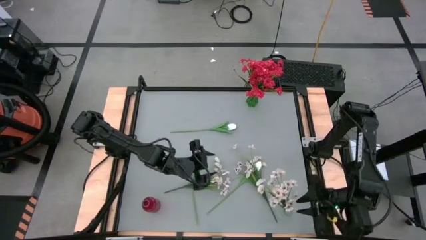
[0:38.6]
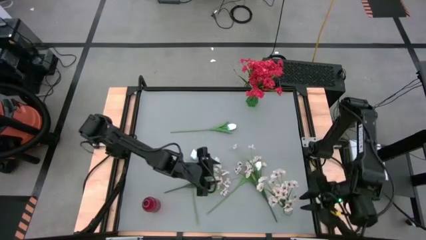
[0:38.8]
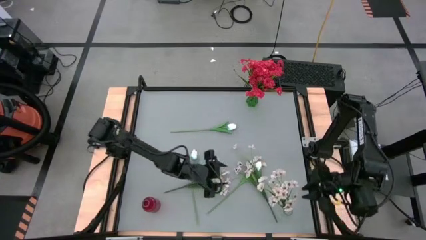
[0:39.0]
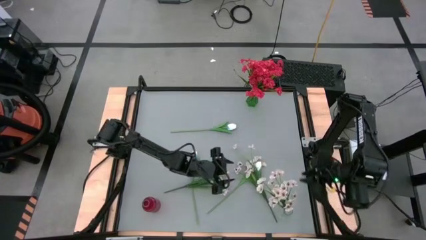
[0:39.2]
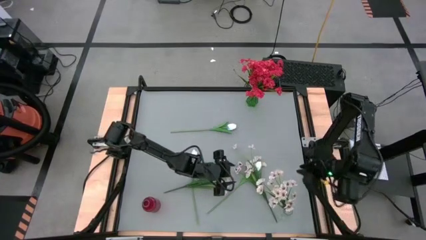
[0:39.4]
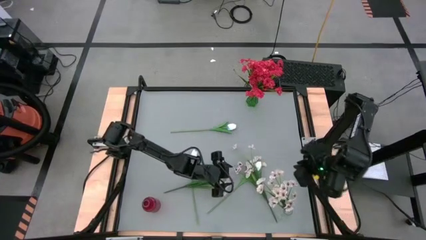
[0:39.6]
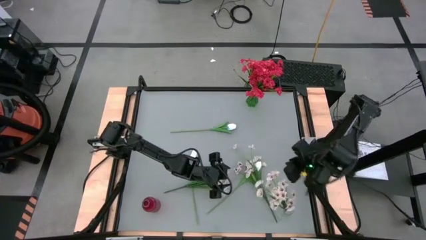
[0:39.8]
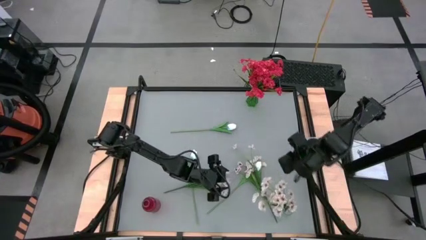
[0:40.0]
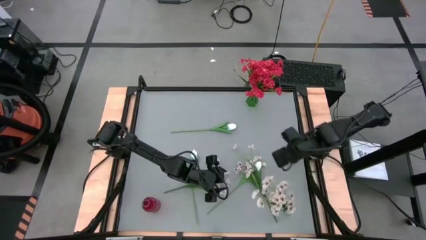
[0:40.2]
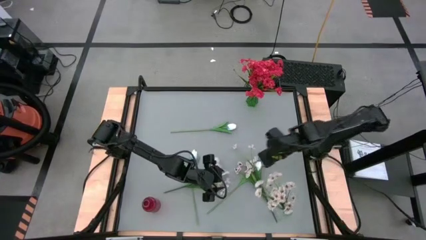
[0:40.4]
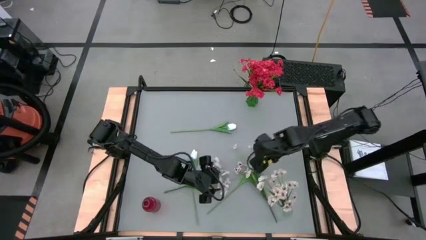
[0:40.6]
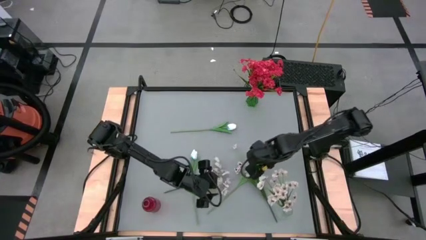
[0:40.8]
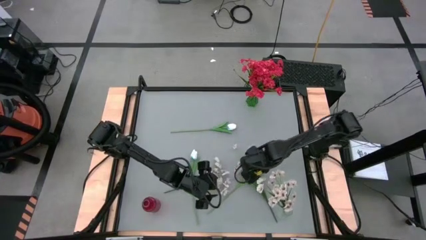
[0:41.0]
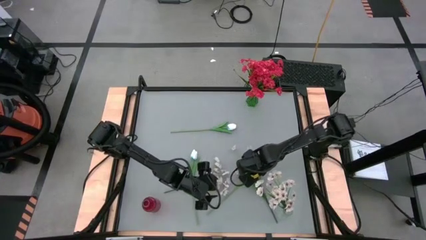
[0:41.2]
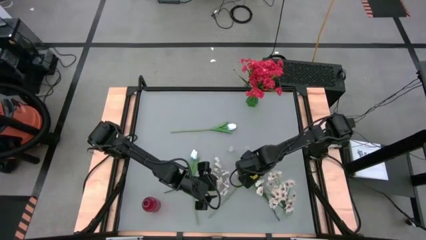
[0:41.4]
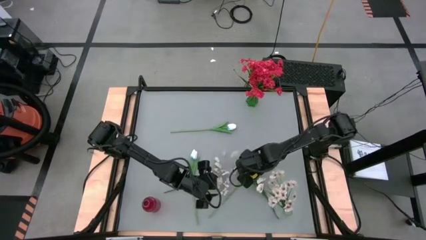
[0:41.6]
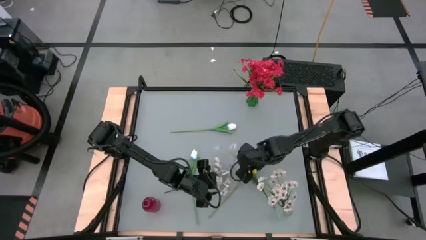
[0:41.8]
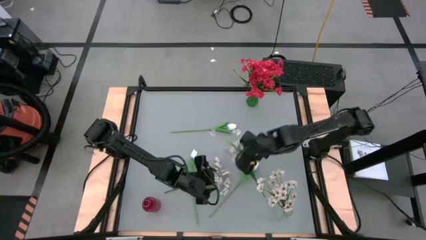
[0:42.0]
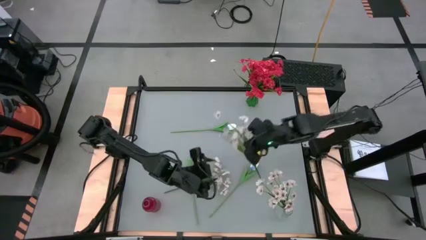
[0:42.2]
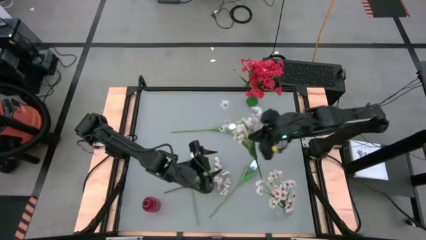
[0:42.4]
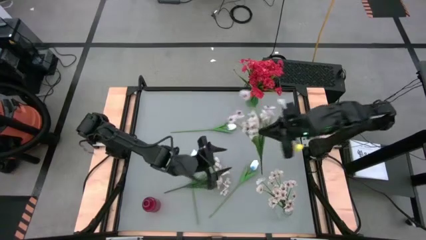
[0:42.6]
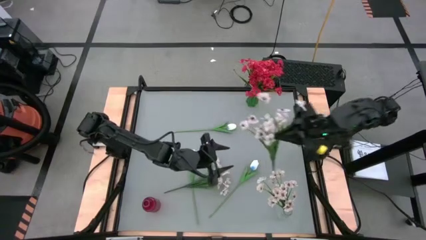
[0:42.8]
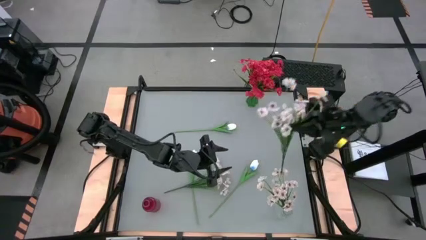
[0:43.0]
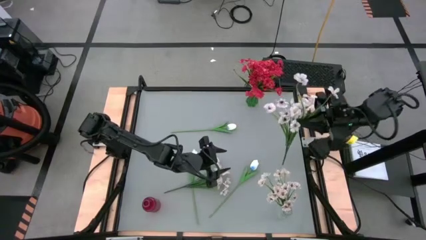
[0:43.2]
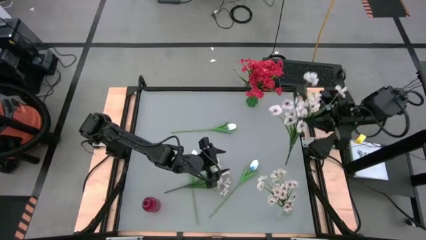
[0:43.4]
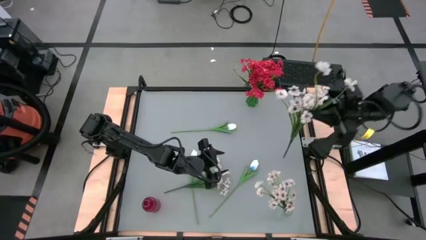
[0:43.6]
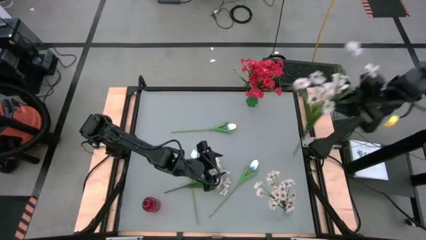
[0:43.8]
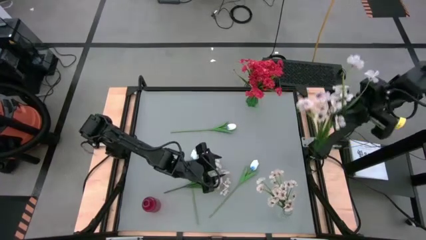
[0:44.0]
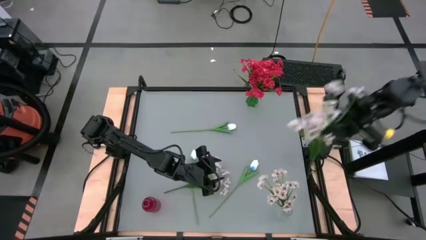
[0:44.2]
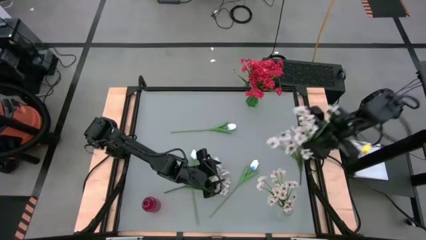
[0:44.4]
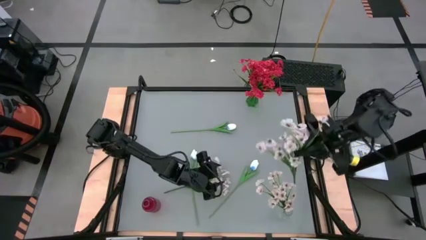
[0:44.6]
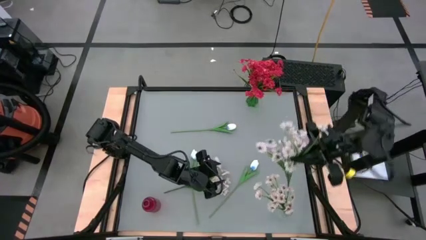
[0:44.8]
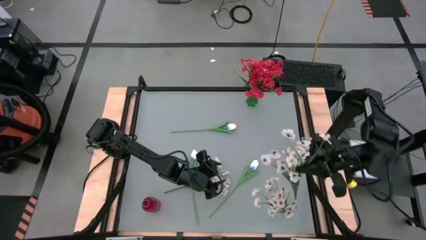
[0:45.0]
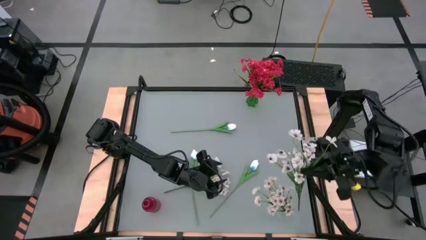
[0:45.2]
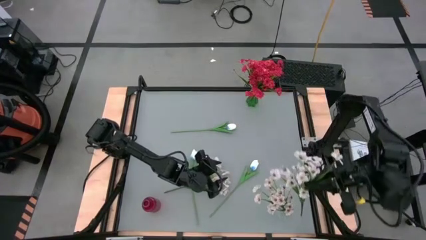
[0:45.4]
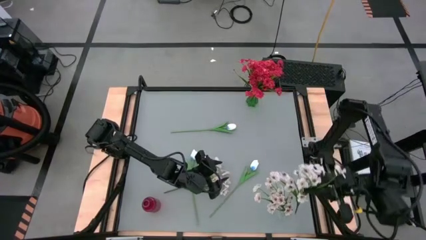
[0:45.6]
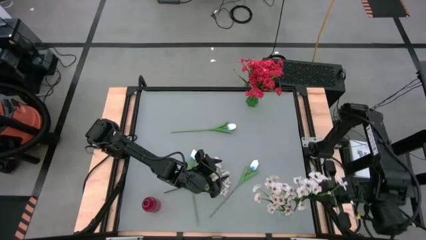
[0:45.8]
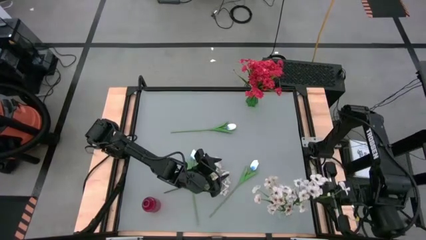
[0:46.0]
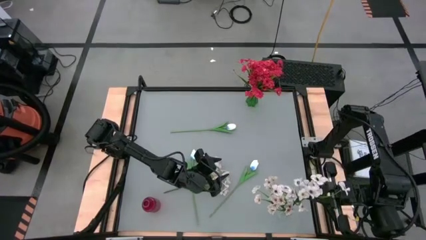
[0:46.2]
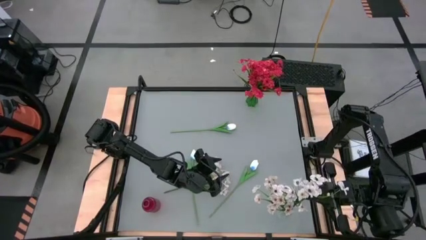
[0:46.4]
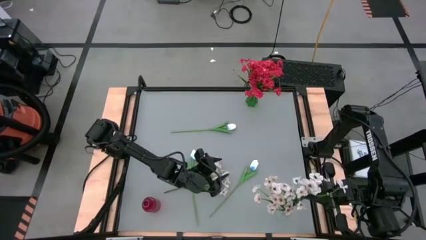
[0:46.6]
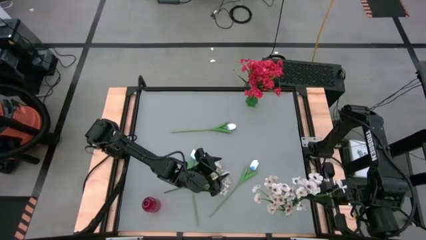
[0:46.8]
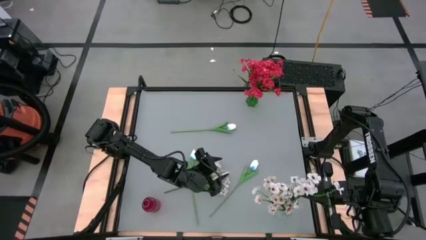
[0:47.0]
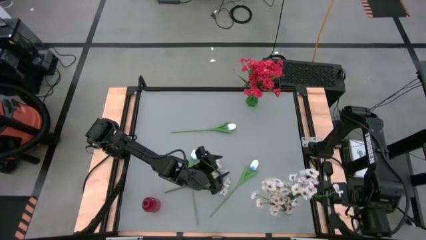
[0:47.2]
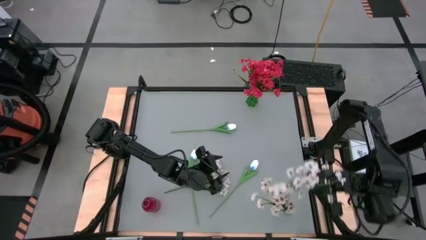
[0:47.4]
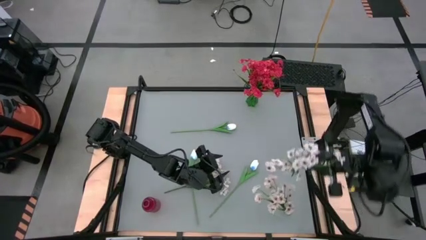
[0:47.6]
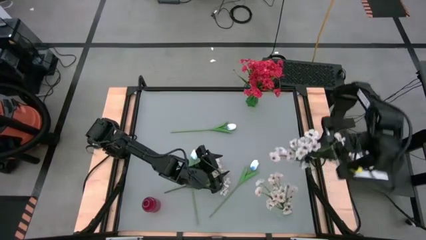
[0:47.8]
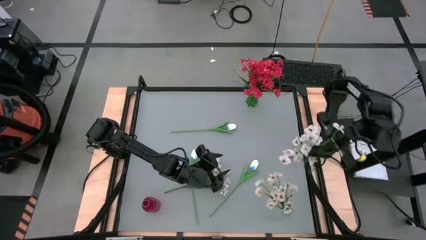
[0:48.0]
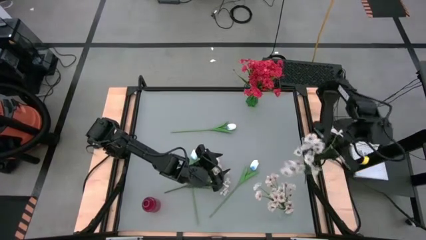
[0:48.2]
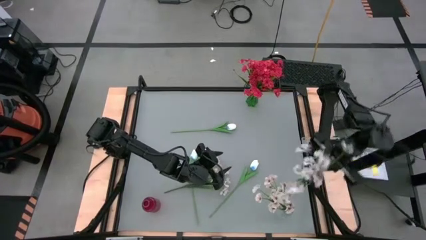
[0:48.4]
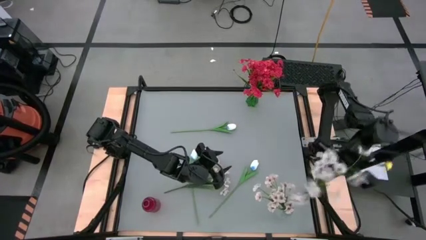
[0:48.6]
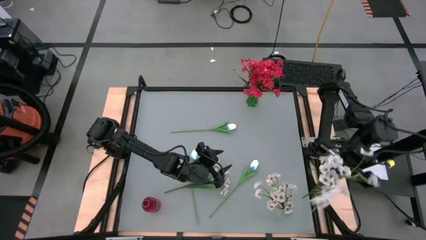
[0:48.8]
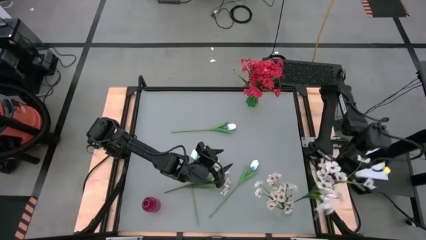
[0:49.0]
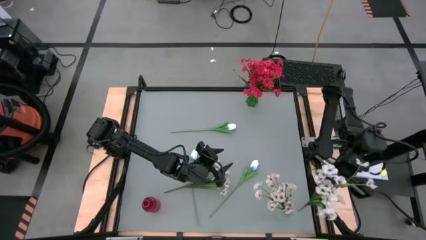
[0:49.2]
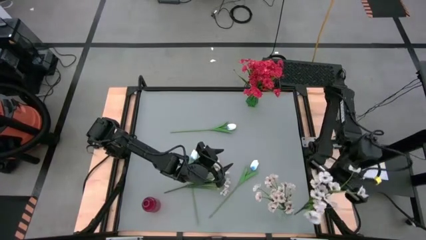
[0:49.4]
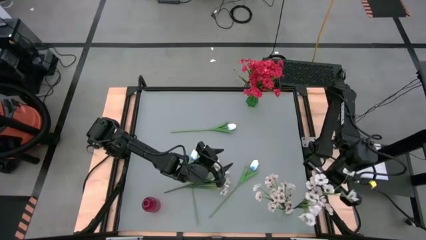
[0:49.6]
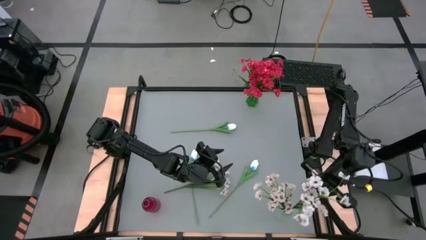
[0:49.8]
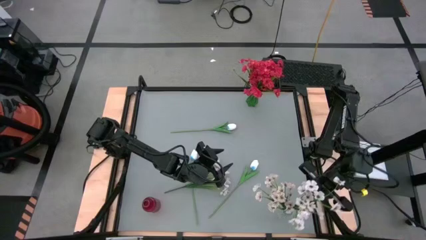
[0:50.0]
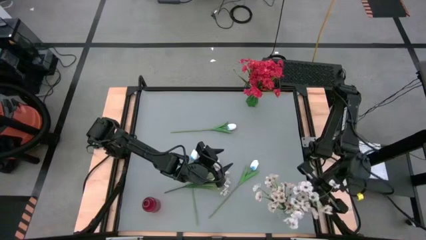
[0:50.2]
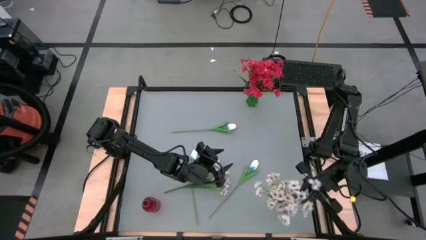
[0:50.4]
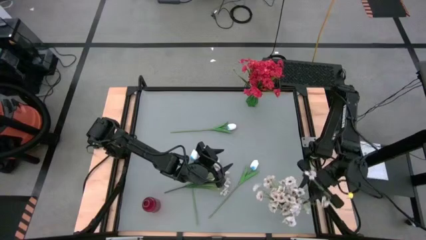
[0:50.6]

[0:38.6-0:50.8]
Task: Sort flowers into vase by color
Put the right white flowers into the transparent vase

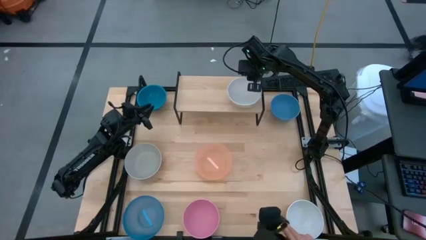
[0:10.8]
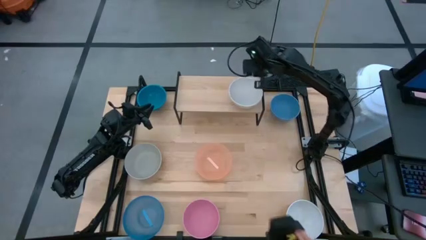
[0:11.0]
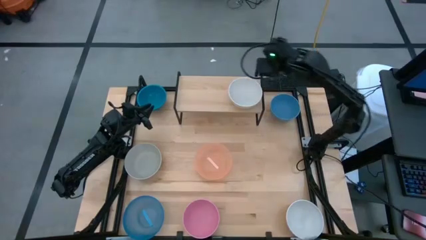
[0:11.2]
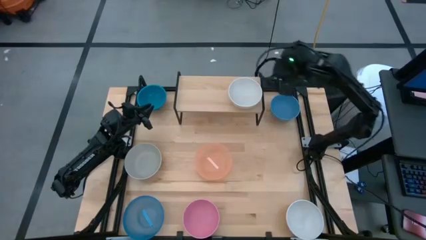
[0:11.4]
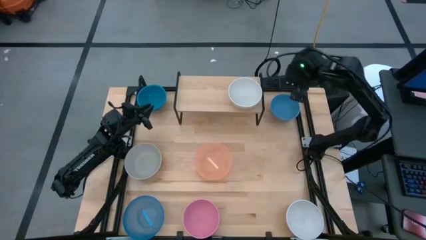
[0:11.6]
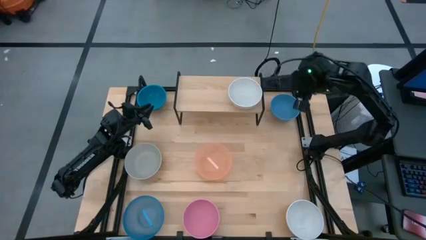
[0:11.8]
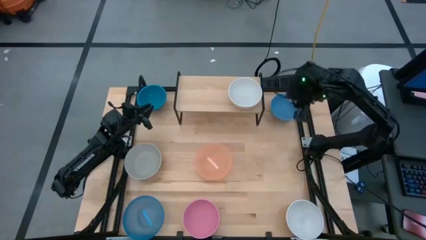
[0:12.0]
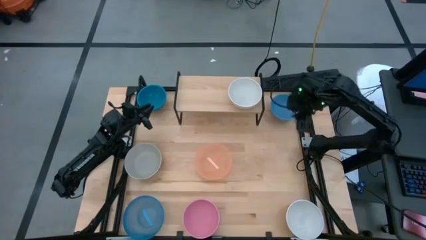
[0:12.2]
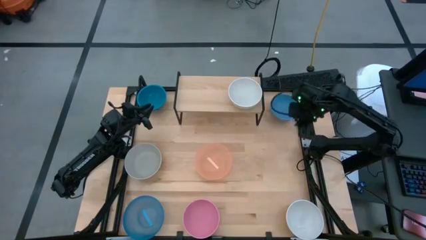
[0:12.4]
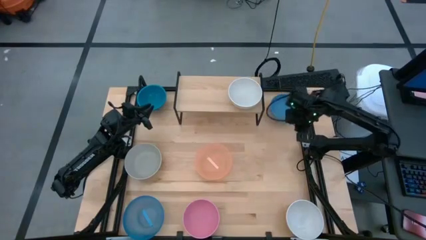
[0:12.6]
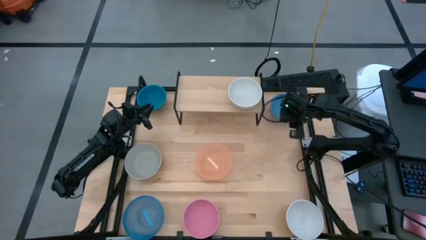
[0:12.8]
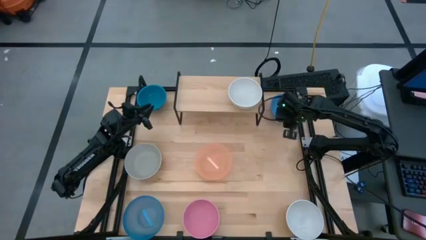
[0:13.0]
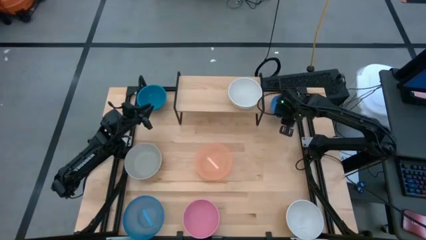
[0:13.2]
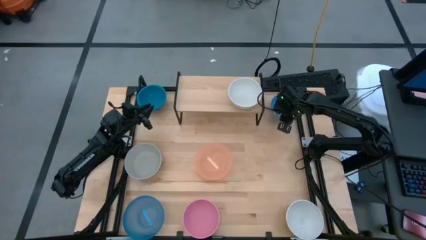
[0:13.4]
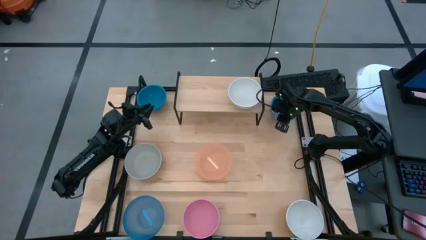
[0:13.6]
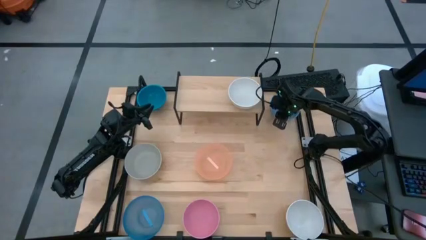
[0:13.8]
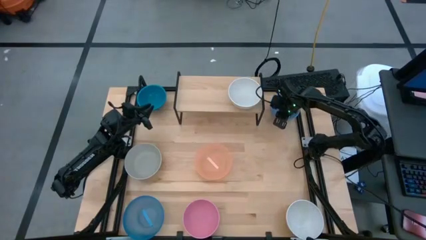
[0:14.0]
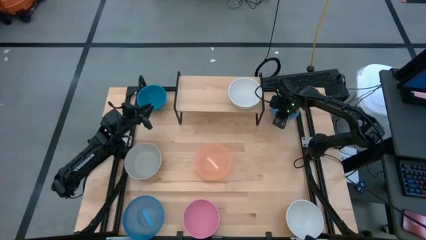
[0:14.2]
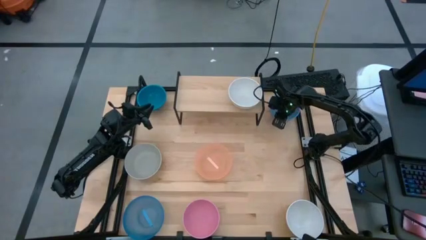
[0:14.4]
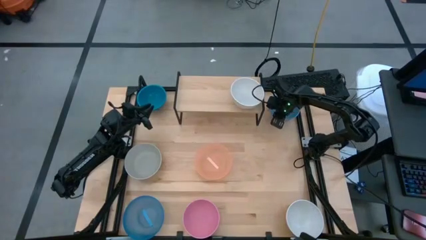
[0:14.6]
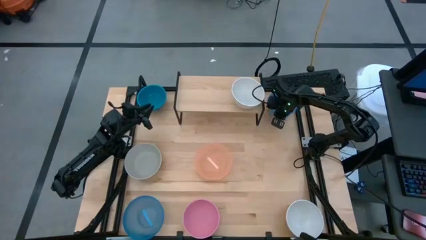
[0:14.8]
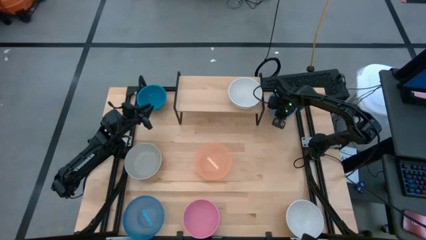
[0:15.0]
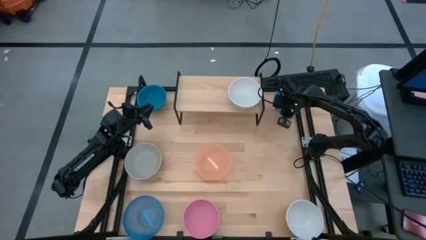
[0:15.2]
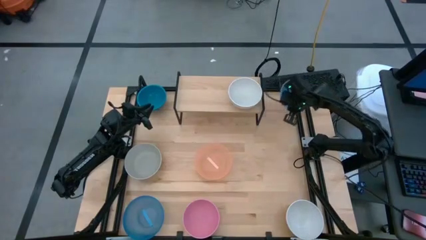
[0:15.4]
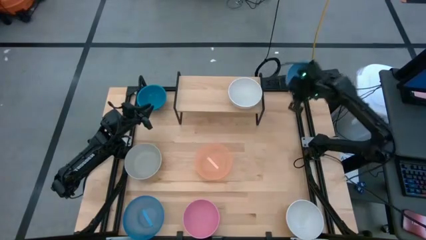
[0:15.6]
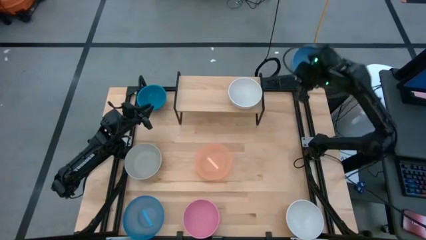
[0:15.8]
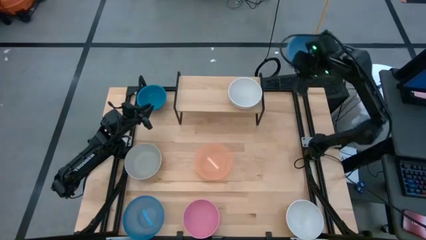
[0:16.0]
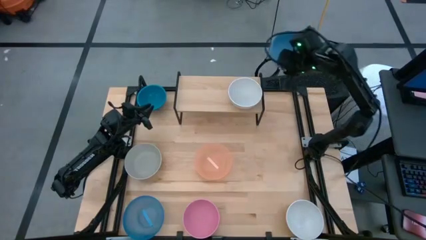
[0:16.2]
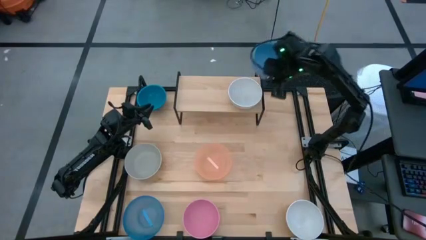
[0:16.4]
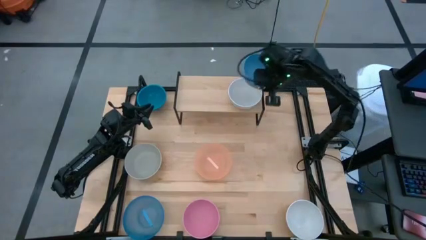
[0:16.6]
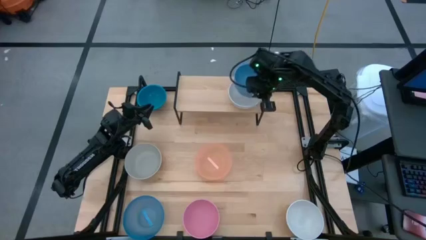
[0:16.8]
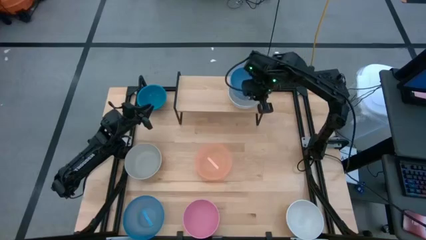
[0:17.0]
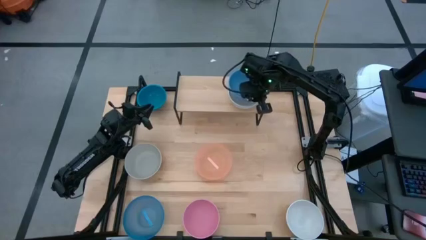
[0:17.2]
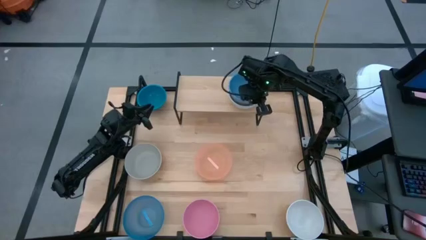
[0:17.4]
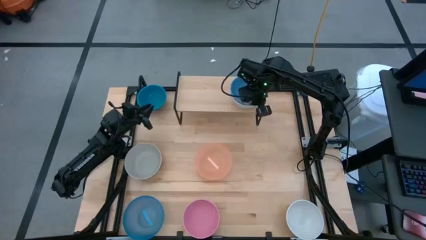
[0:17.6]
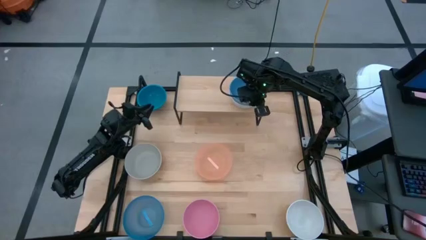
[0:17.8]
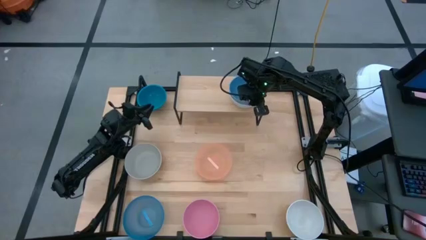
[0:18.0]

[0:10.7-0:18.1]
Task: Place and stack bowls onto a shelf
Stack the right blue bowl on top of the white bowl on the shelf
